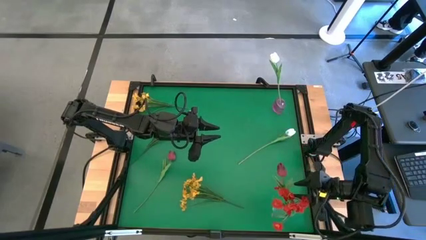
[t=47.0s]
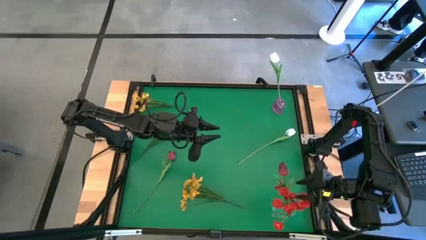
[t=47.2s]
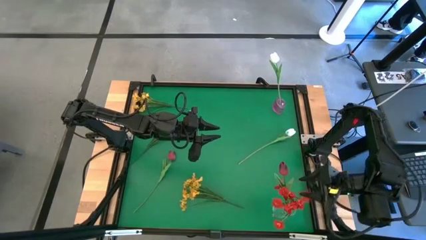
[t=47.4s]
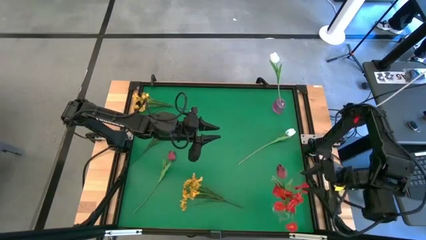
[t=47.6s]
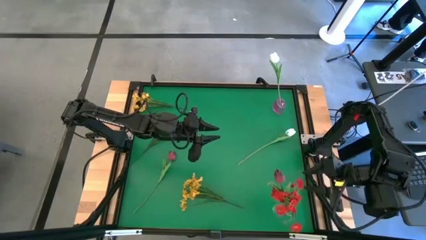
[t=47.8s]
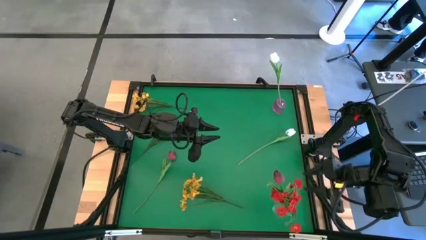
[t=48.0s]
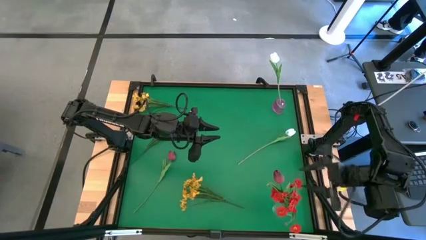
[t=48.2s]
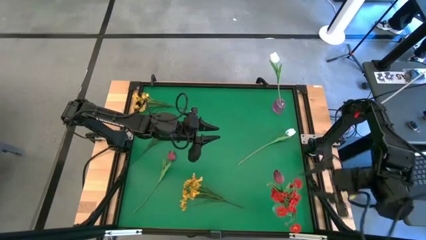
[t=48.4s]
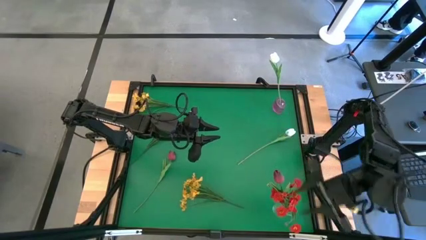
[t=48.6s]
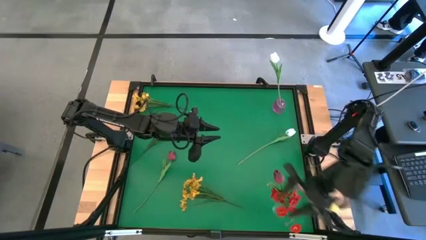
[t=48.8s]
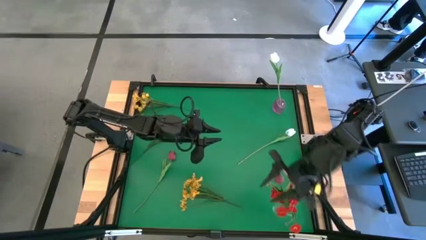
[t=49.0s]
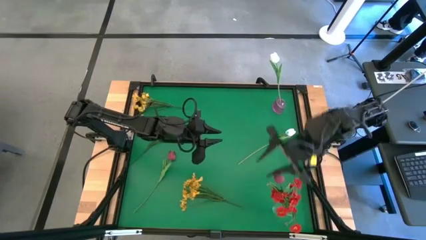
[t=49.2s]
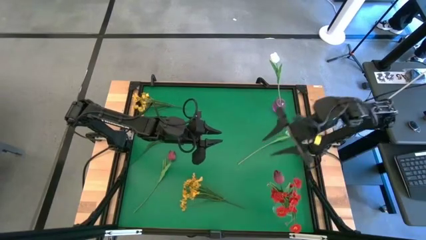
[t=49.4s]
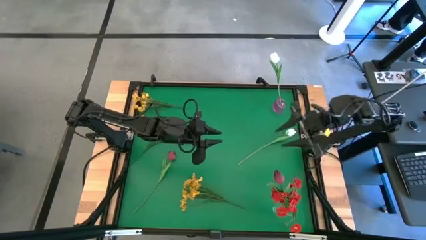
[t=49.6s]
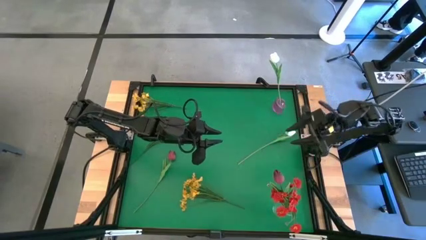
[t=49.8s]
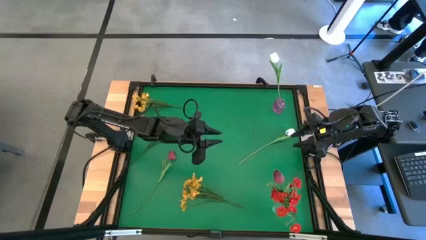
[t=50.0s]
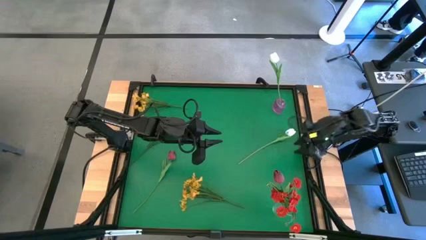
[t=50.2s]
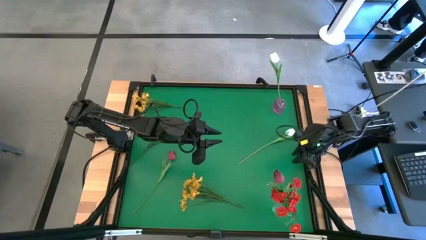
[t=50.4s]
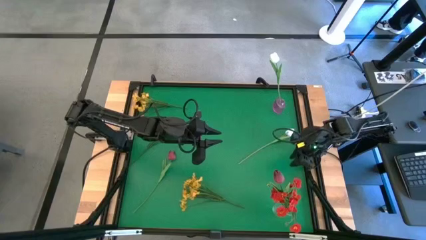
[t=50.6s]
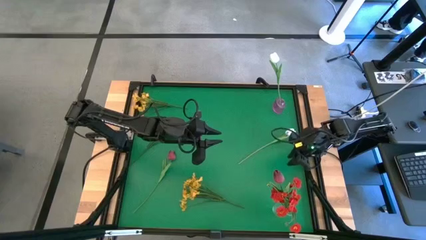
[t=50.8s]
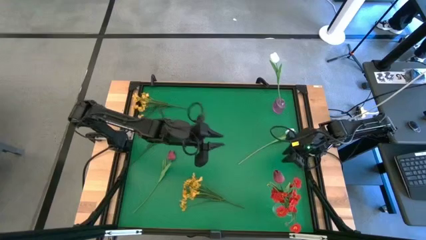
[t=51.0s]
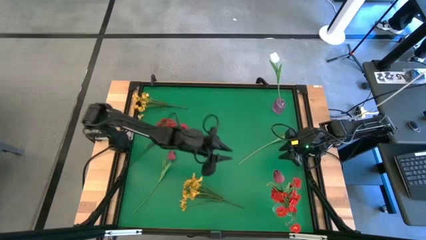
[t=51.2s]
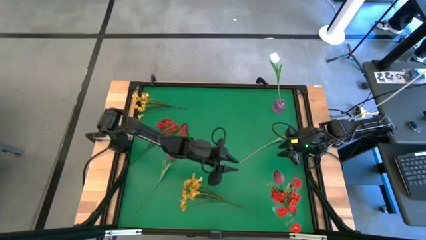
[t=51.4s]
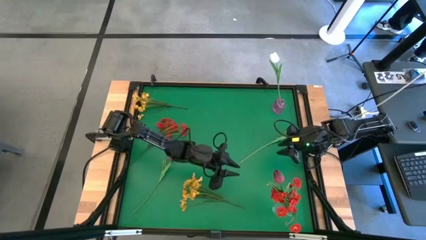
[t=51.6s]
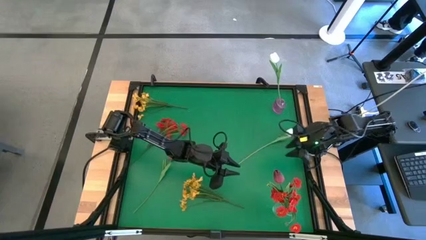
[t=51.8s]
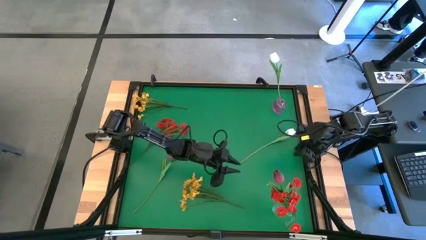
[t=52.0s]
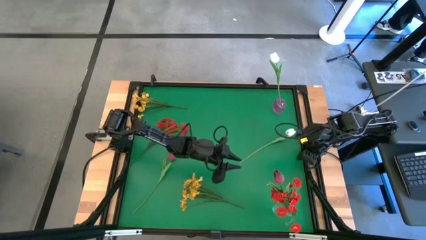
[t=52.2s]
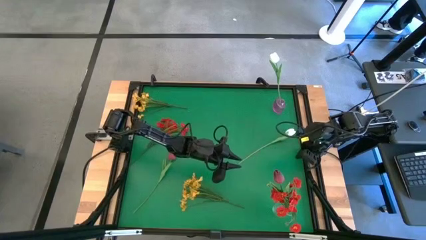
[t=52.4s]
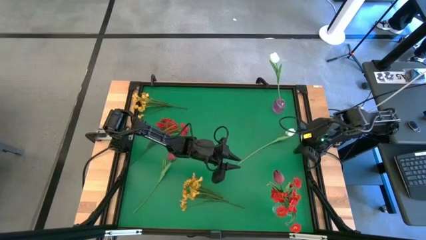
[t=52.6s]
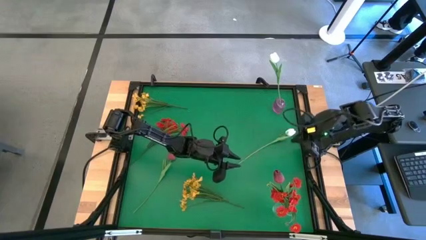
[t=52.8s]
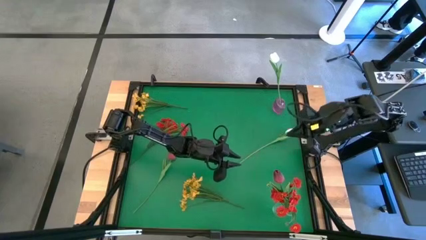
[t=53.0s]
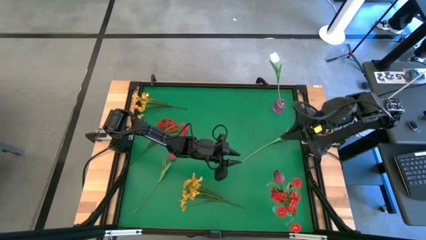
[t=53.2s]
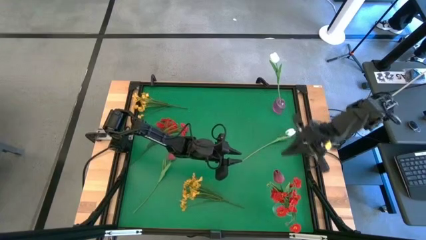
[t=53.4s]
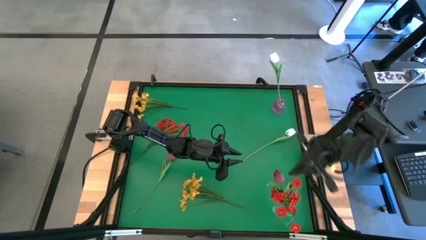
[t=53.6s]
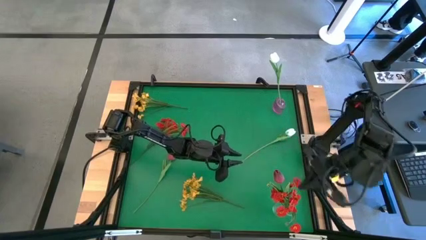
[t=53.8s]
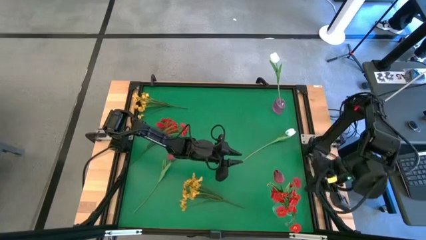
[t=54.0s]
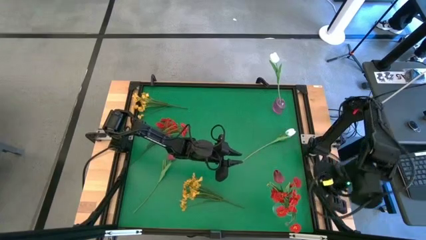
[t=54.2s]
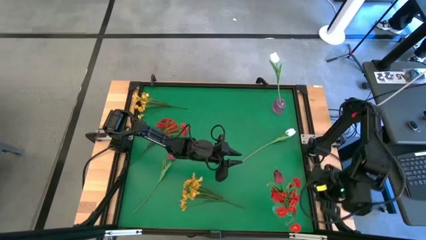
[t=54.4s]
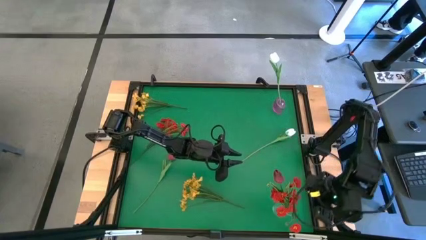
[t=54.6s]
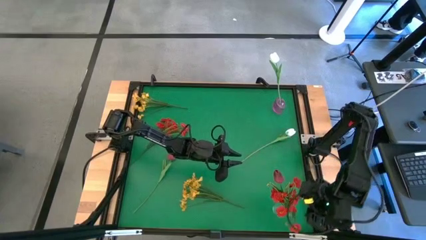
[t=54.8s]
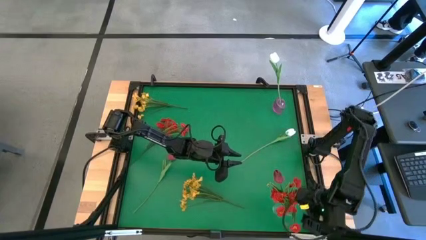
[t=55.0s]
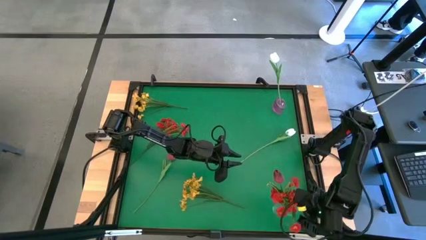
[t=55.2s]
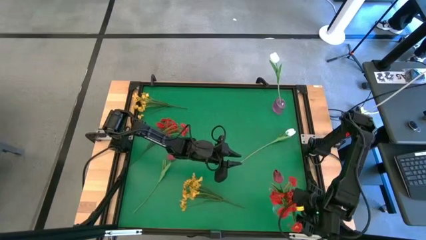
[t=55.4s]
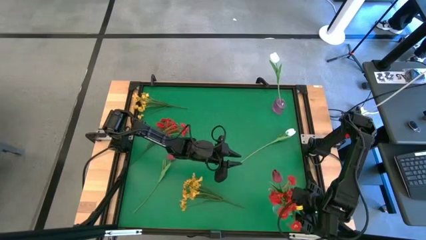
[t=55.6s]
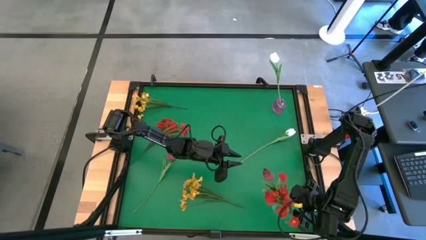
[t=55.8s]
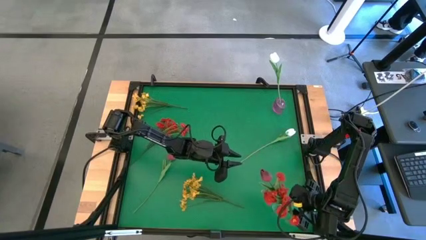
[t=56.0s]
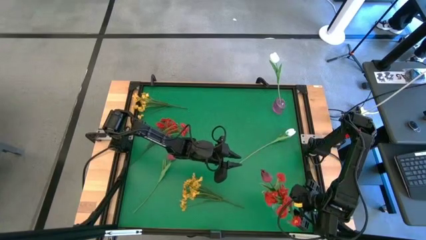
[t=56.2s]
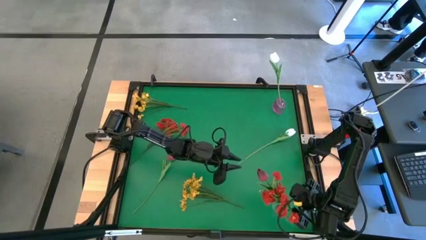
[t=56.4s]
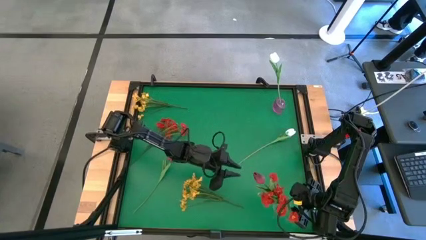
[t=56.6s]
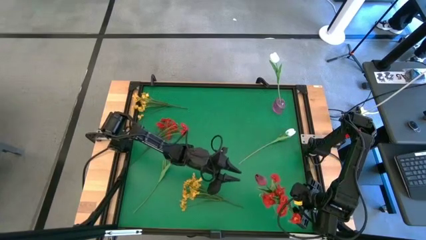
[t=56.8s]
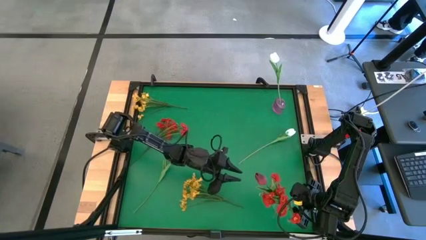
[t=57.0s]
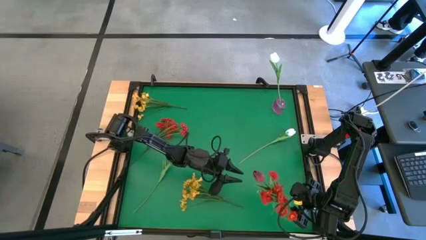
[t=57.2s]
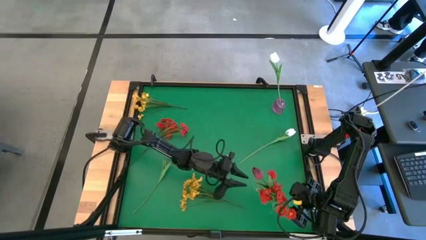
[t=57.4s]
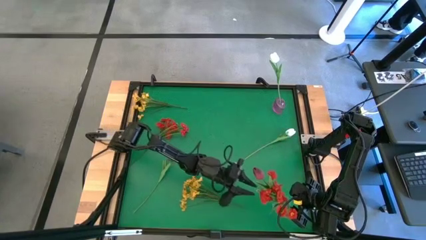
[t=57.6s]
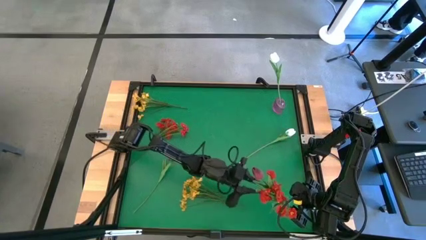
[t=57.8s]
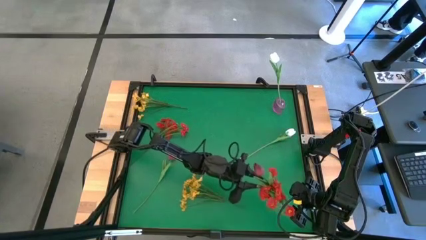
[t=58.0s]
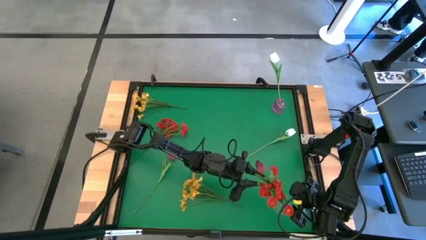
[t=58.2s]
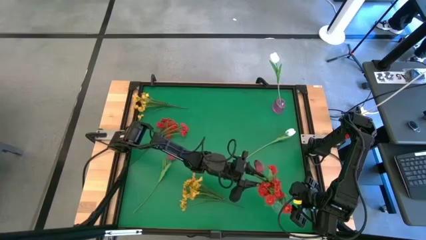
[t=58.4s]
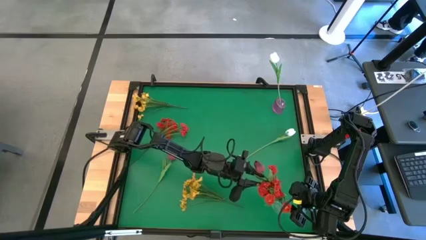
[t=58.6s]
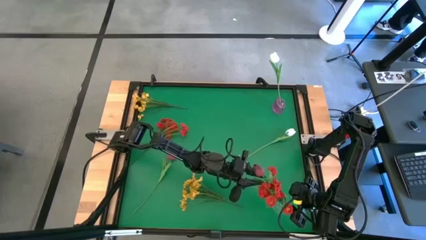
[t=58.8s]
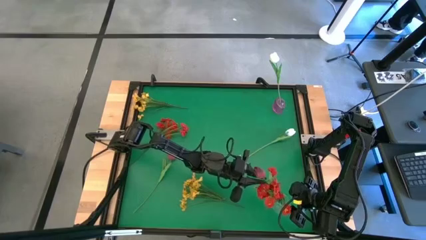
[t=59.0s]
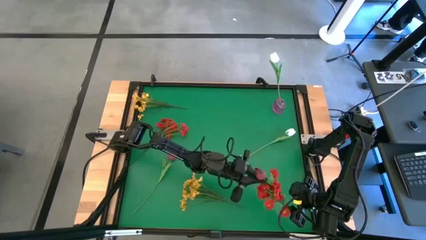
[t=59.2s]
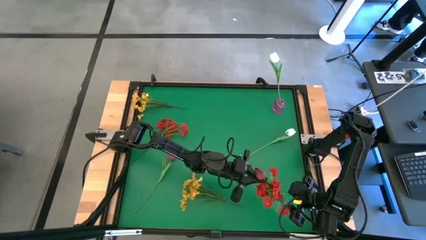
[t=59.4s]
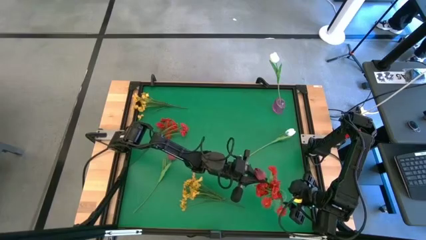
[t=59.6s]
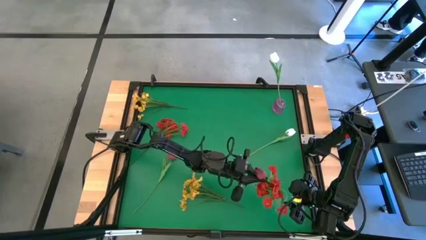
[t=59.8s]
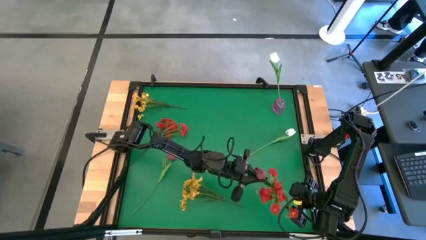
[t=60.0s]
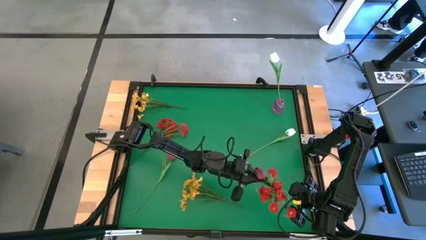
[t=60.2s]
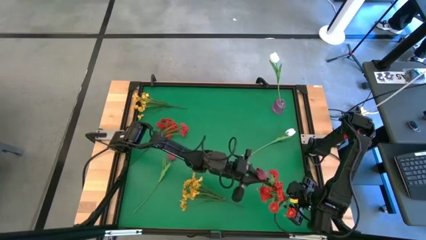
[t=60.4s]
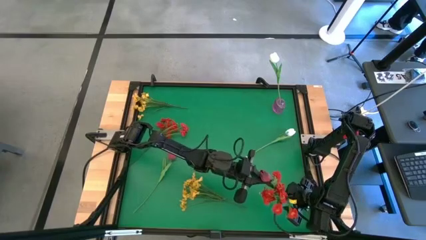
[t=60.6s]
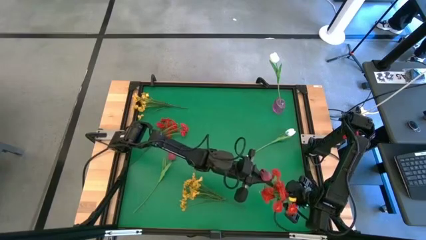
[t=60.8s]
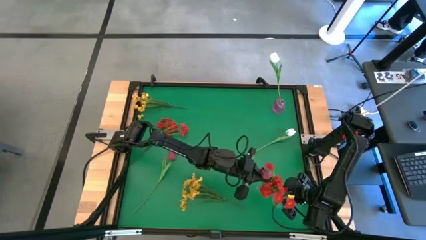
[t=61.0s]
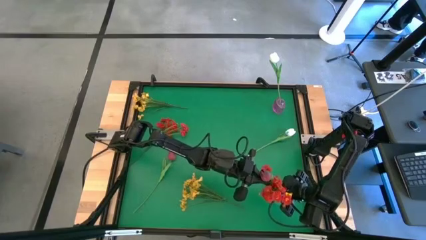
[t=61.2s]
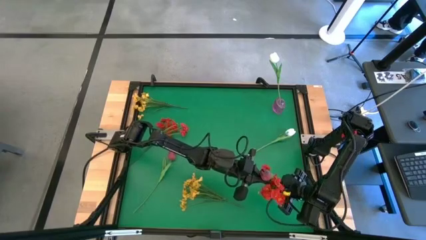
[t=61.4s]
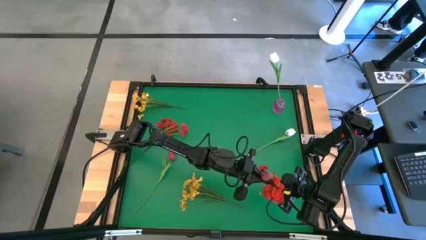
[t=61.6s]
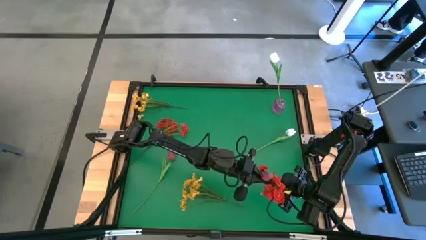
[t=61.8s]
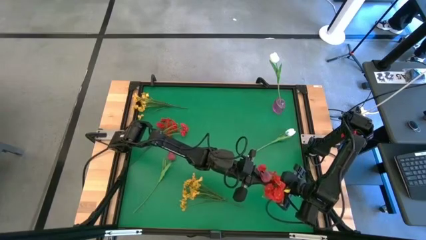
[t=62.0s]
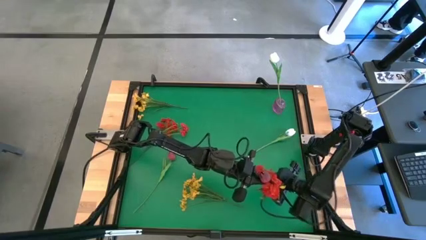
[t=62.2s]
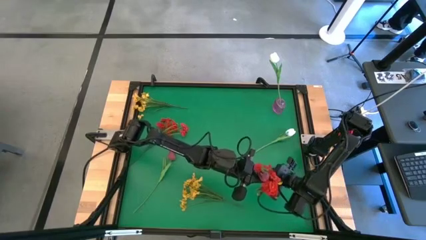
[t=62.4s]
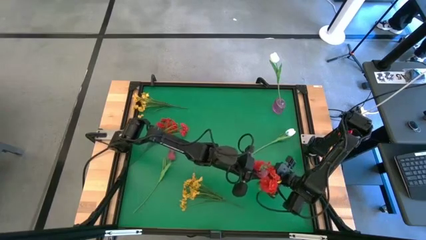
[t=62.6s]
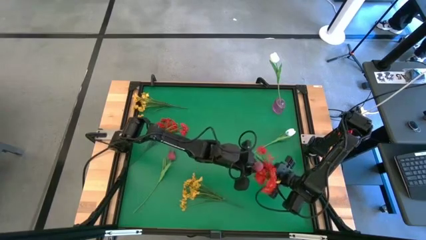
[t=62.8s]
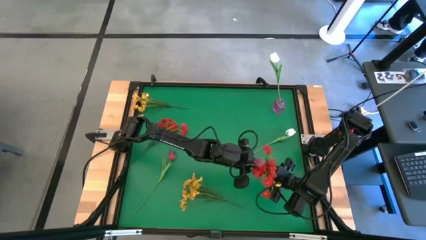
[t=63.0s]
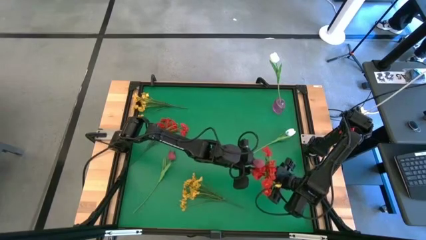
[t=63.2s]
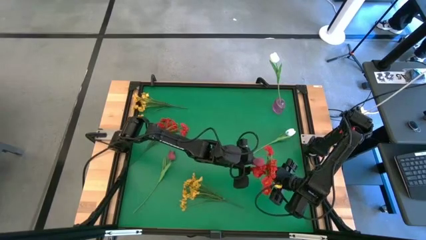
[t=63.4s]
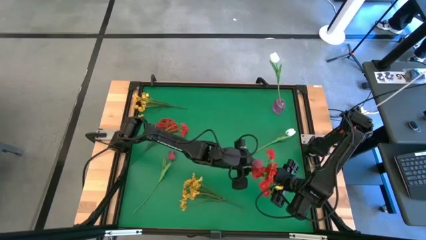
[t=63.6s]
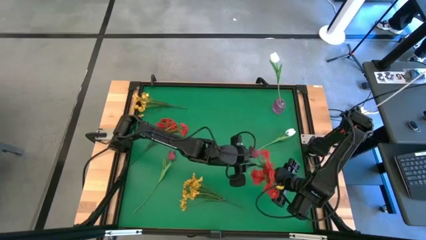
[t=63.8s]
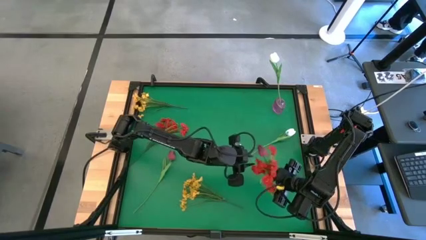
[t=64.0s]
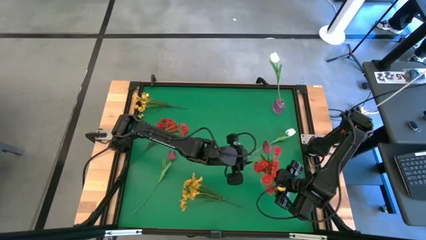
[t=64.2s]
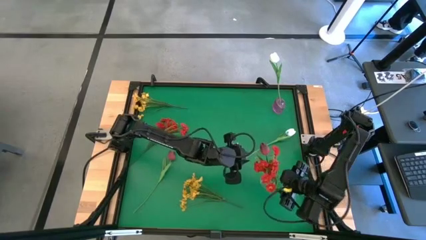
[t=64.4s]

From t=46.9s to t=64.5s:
Task: Sort flowers into vase by color
Adjust the transparent vase
